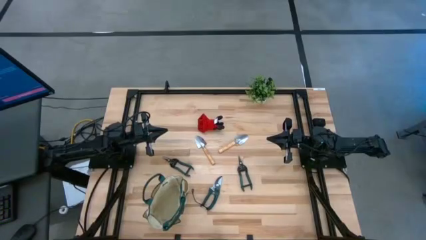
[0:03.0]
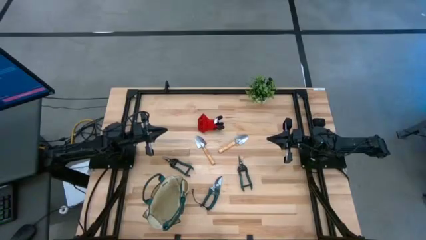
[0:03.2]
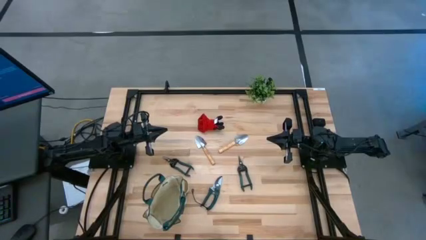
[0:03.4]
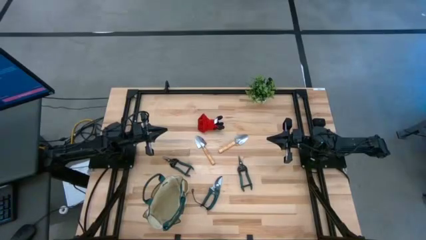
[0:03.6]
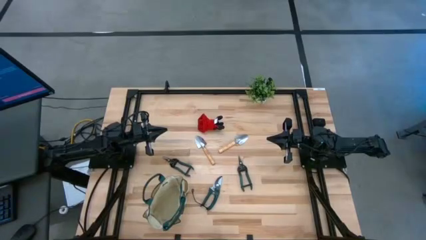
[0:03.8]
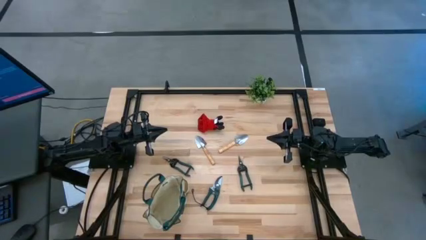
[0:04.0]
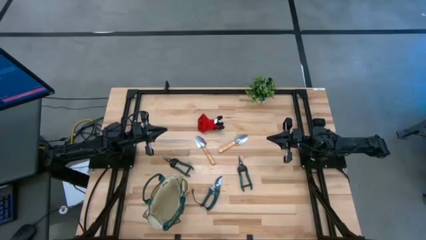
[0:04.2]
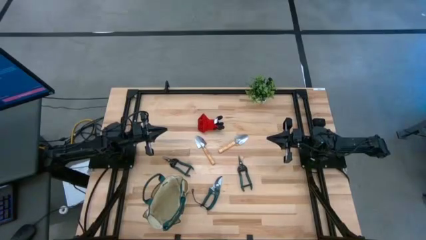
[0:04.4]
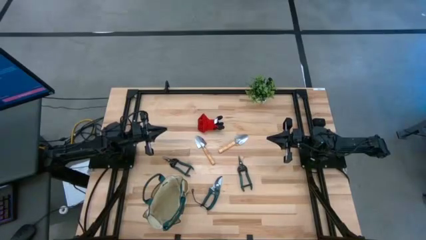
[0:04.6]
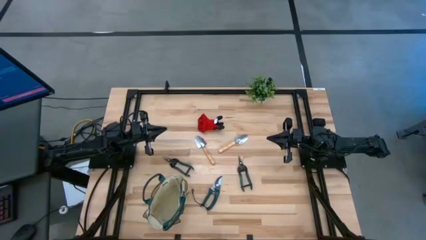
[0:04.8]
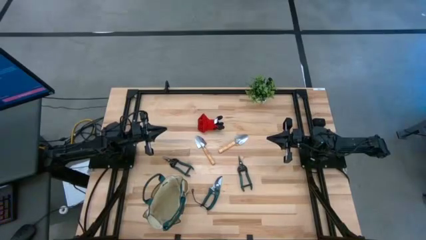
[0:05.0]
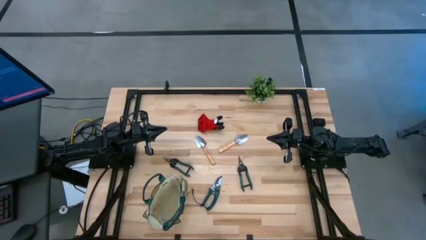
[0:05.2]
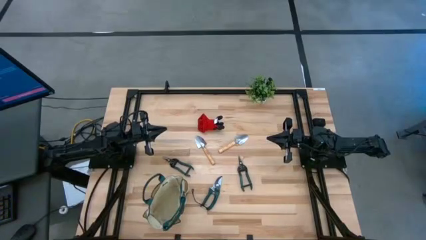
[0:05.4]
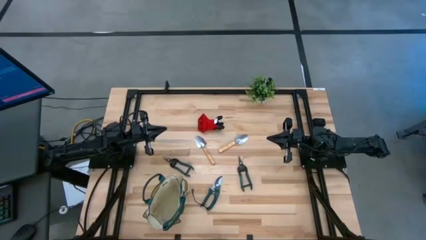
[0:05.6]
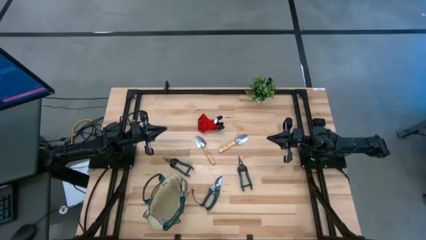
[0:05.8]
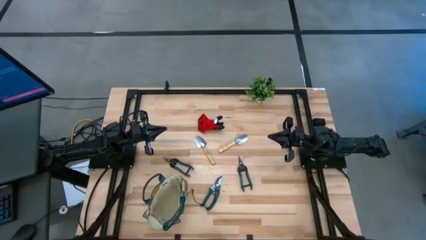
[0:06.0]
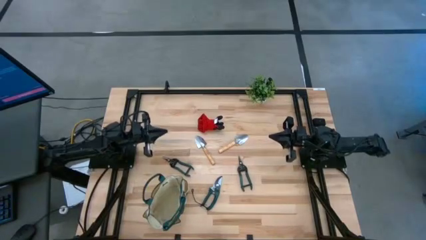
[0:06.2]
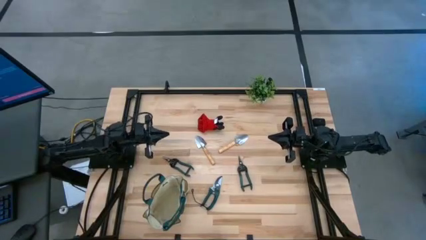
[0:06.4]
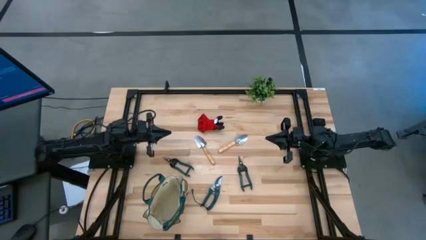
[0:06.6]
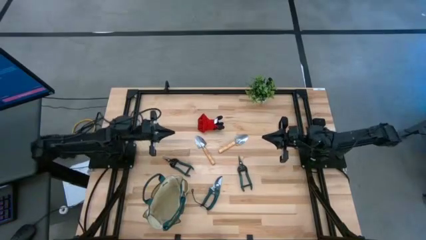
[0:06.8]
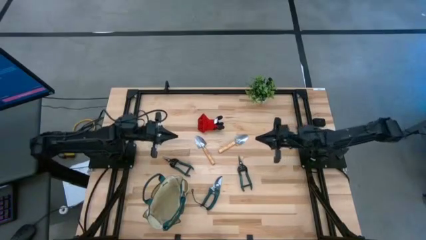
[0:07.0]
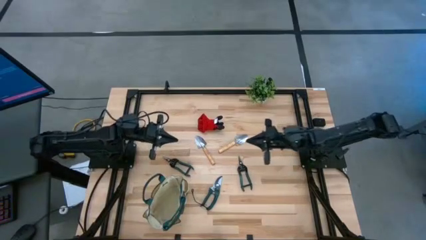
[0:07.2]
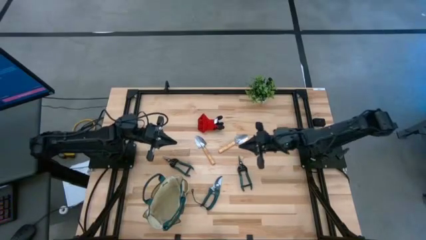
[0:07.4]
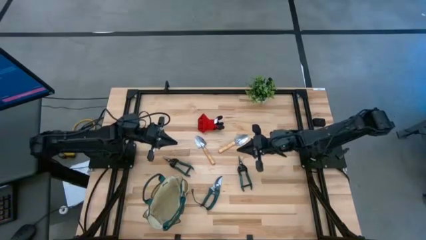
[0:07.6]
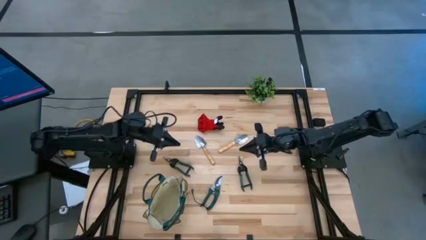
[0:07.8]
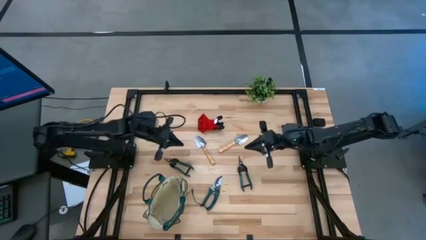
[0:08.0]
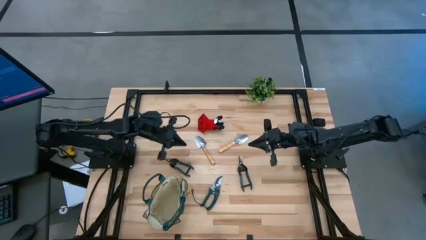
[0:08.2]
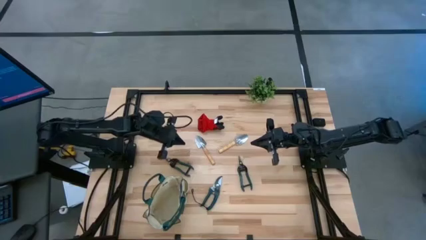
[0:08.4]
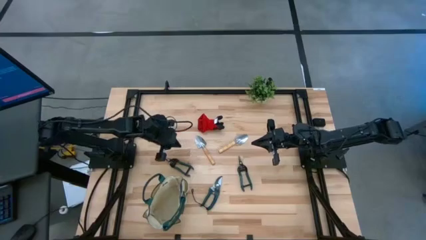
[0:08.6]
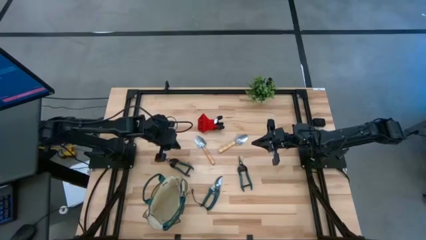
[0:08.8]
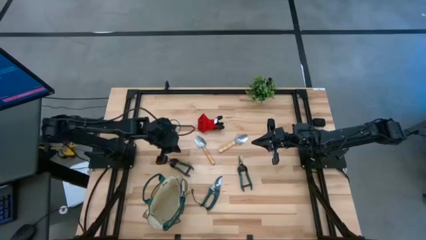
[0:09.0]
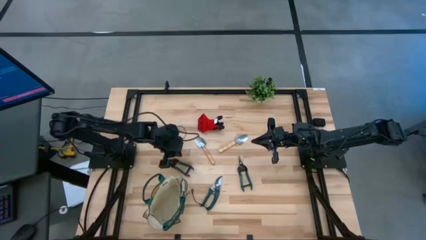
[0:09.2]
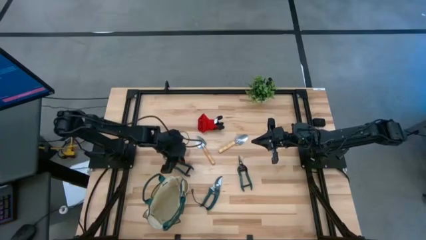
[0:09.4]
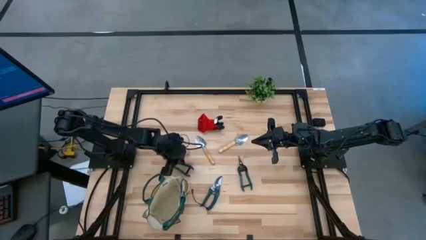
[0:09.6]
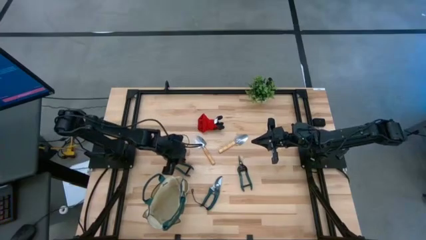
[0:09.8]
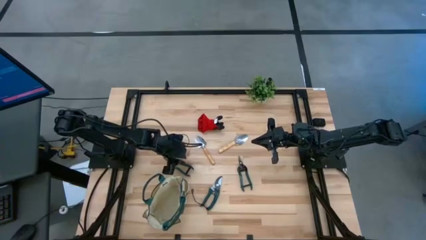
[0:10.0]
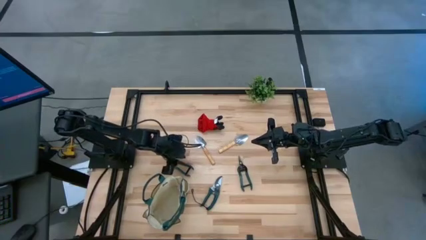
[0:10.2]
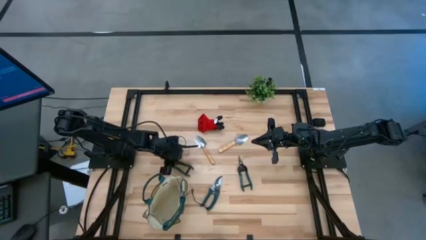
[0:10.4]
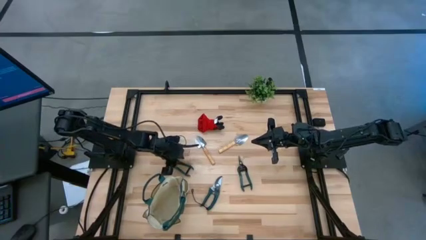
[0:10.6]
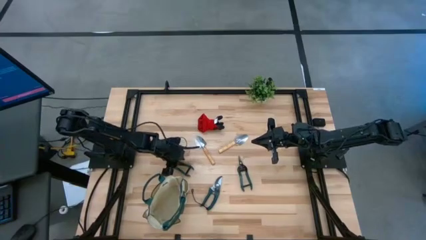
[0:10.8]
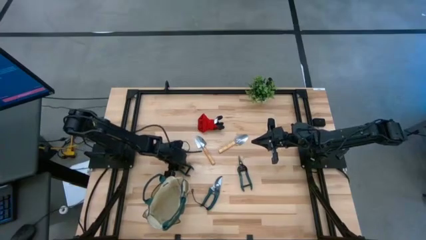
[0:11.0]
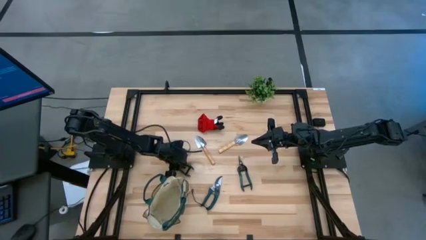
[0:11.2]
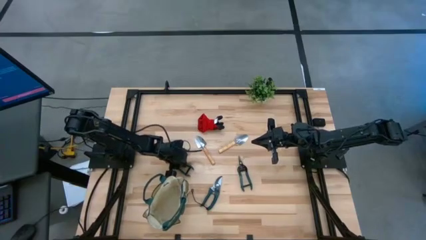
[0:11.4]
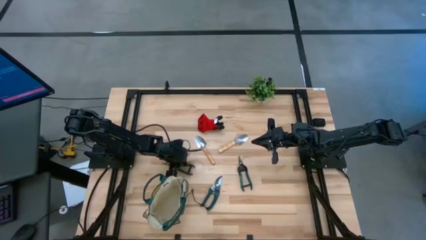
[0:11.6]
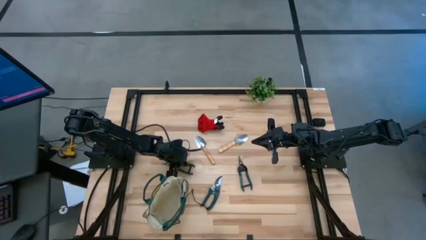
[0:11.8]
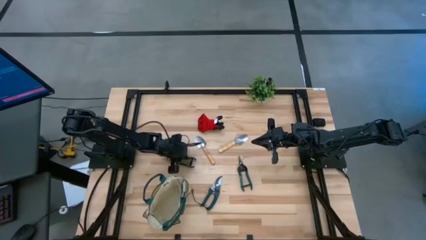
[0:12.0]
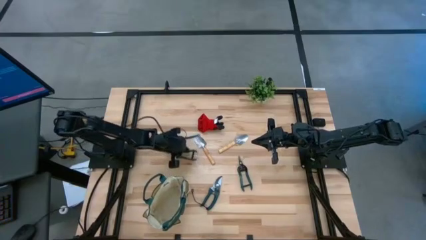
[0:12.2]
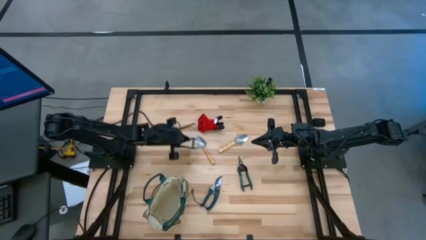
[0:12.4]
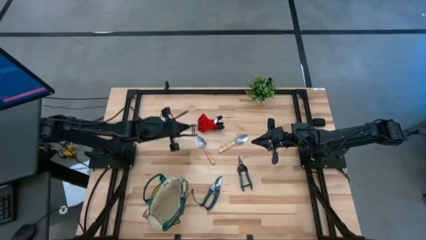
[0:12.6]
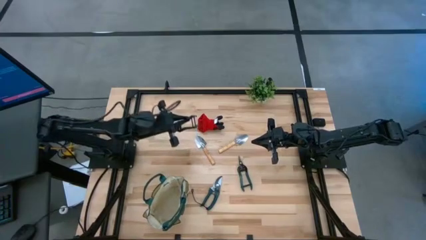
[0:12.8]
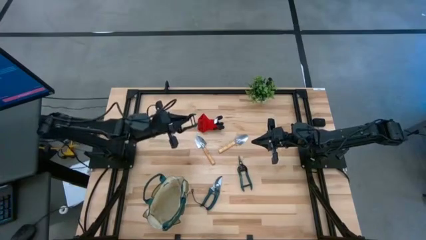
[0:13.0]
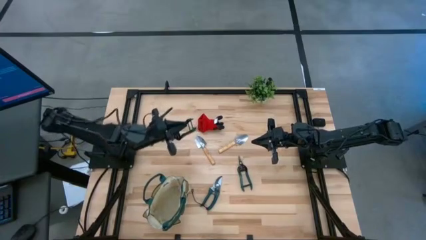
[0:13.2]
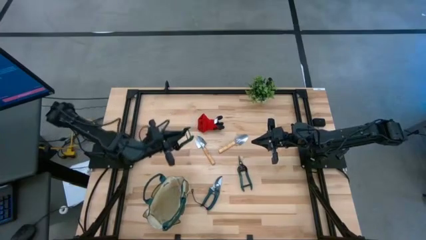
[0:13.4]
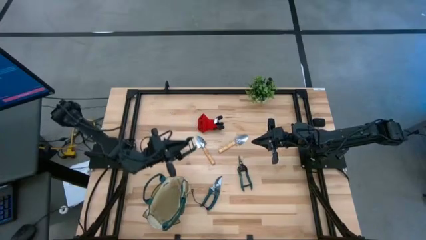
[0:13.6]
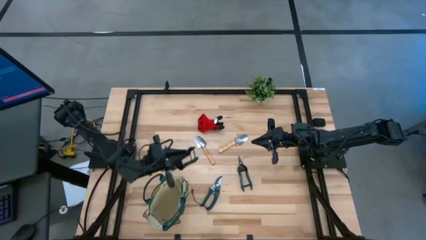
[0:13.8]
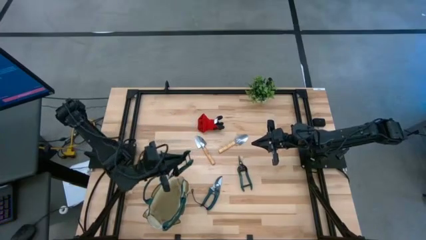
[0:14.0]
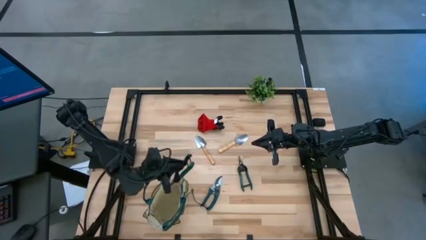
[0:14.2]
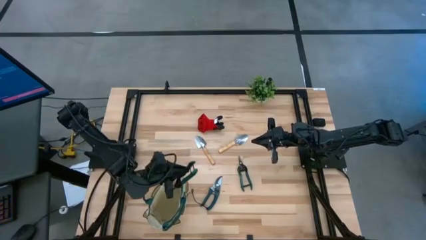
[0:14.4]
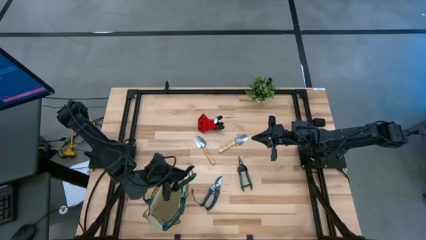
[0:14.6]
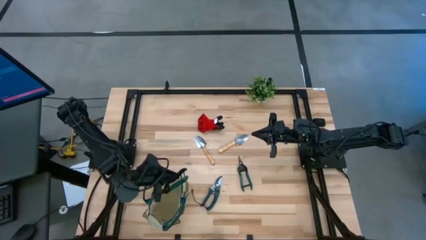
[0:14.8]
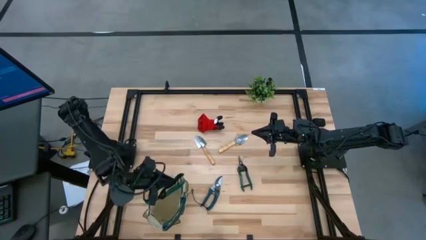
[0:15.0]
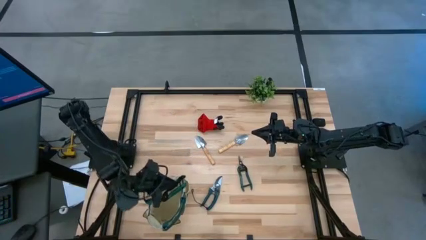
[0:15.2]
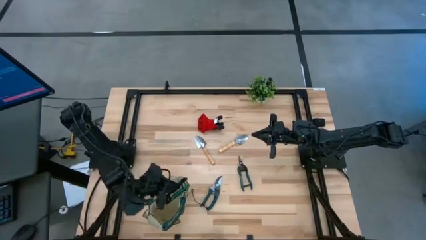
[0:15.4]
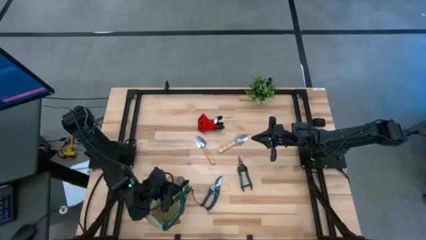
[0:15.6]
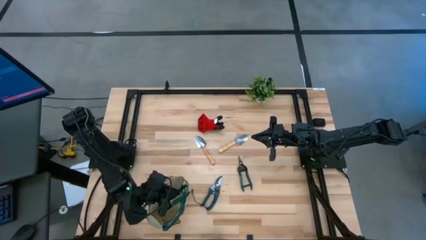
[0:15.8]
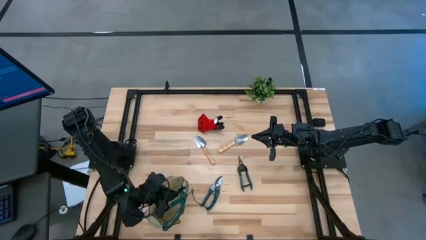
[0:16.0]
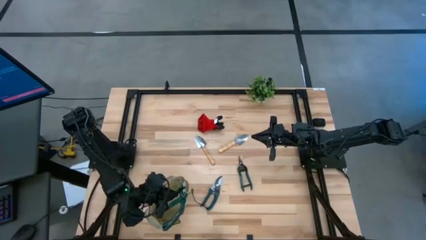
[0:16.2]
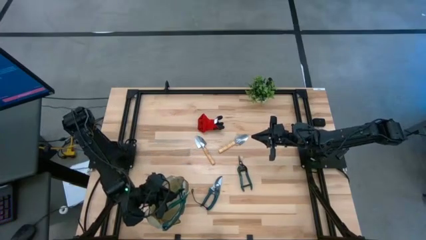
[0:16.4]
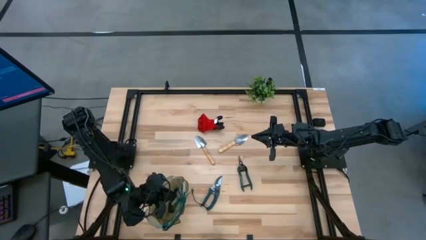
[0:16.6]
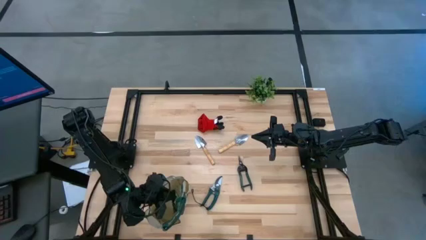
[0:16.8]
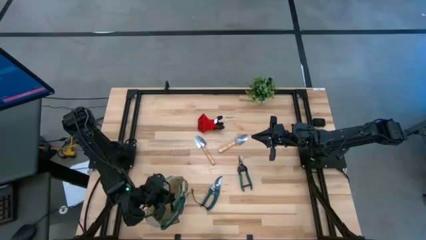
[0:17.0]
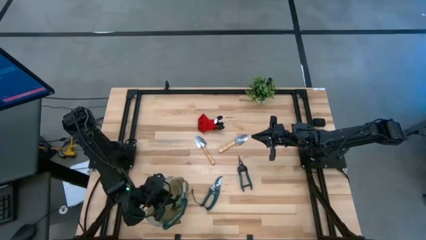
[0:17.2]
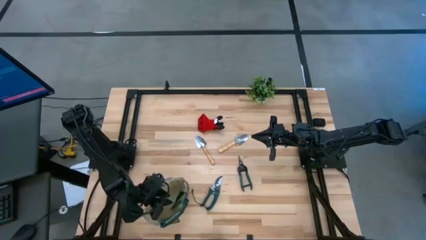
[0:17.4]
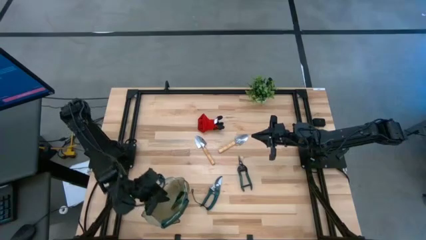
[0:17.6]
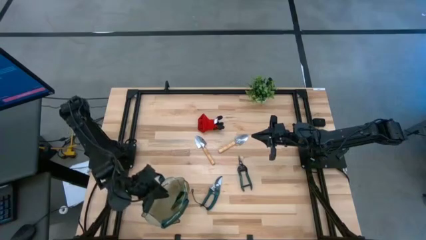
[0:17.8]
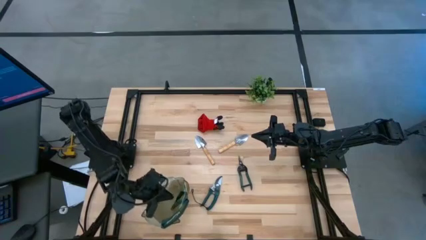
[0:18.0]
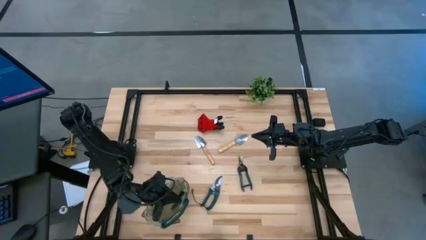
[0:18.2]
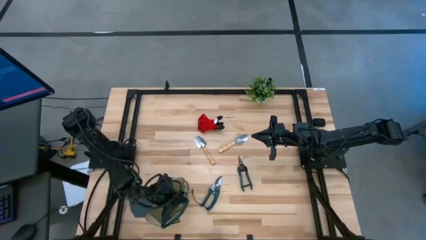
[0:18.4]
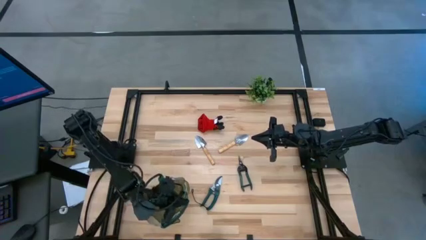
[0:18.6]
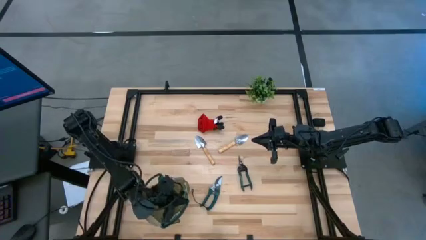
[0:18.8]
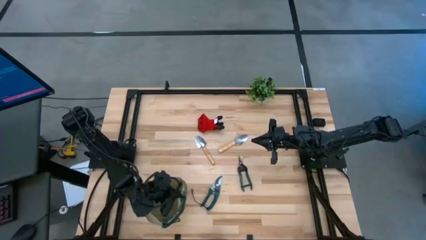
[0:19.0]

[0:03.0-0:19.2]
Task: Pick & Place Garden tools in Gardening bag
Put the left green fruit pruner into the green gardening bag
